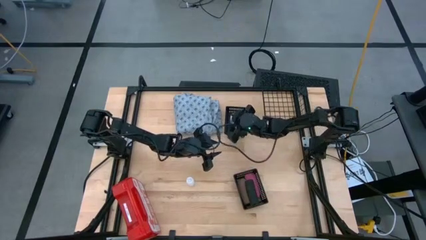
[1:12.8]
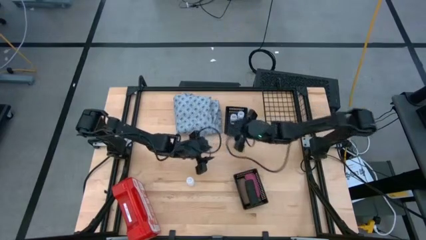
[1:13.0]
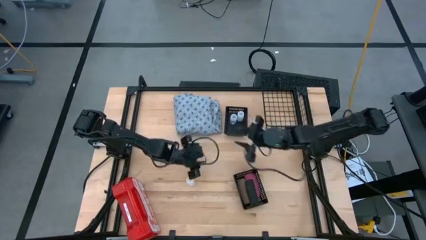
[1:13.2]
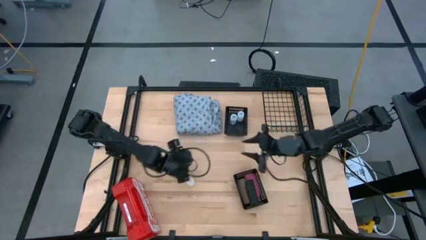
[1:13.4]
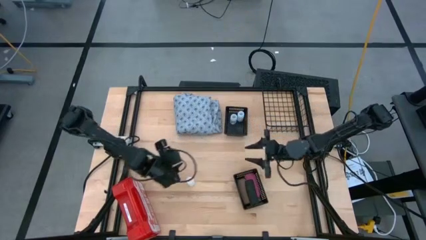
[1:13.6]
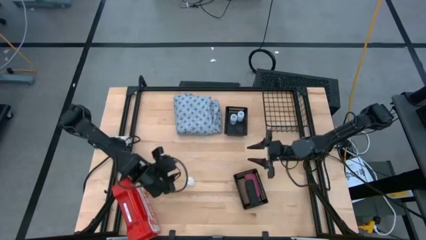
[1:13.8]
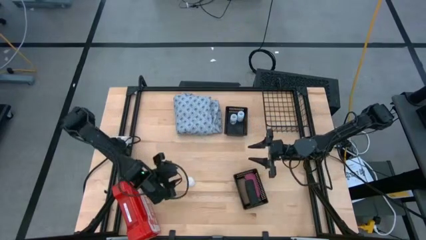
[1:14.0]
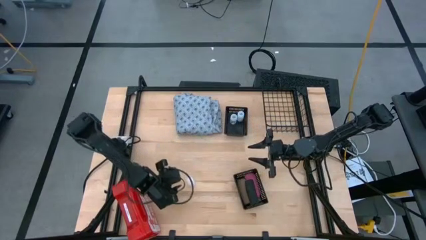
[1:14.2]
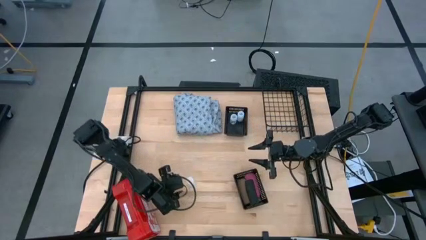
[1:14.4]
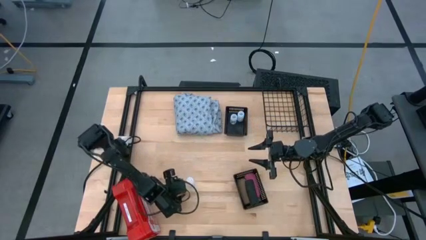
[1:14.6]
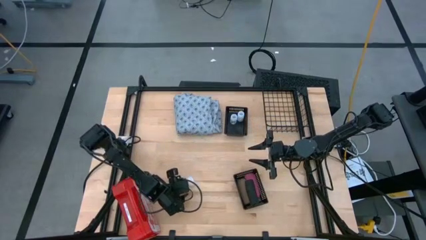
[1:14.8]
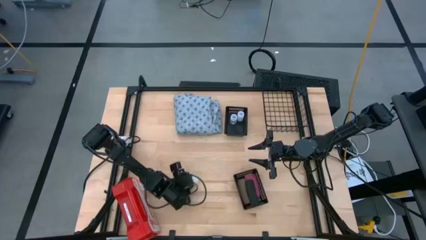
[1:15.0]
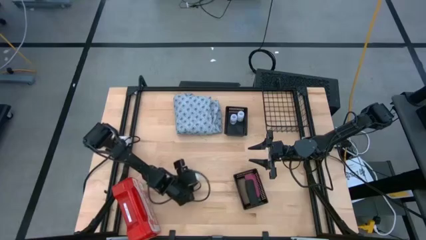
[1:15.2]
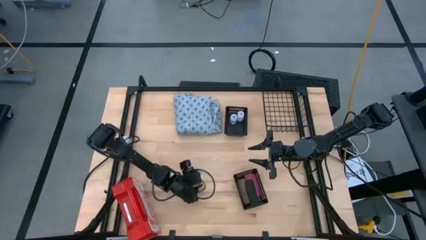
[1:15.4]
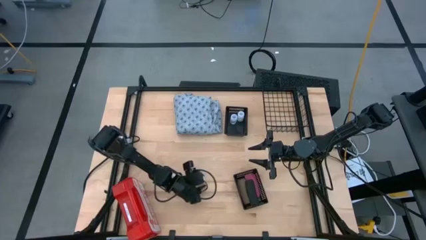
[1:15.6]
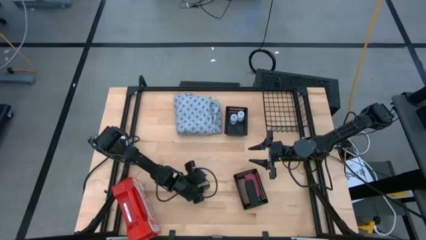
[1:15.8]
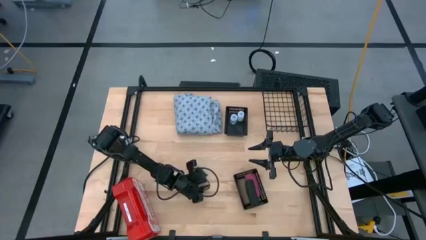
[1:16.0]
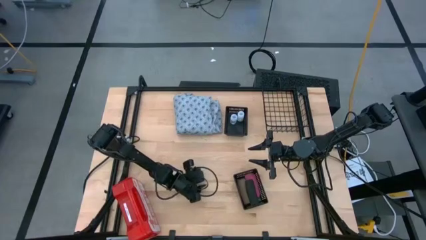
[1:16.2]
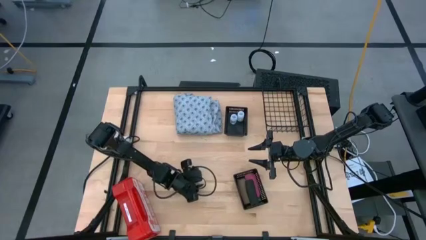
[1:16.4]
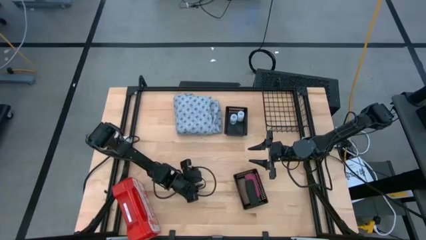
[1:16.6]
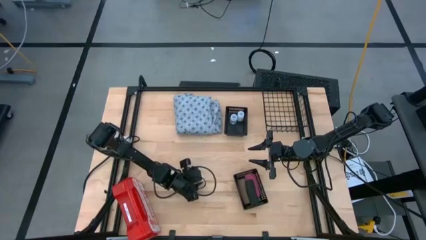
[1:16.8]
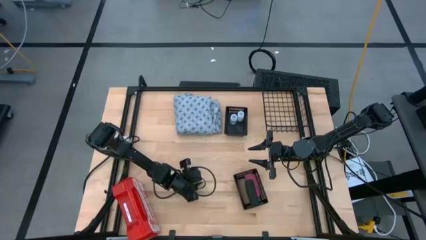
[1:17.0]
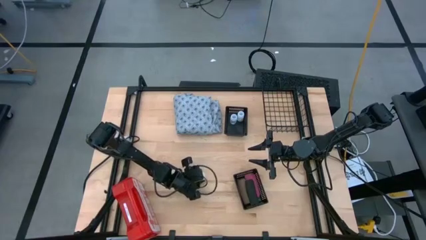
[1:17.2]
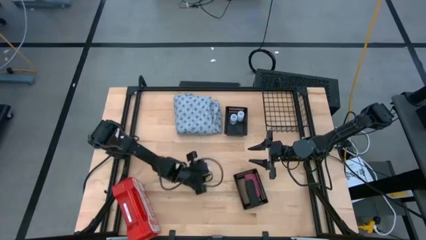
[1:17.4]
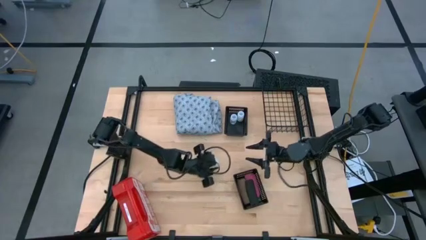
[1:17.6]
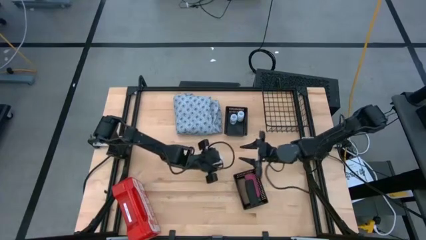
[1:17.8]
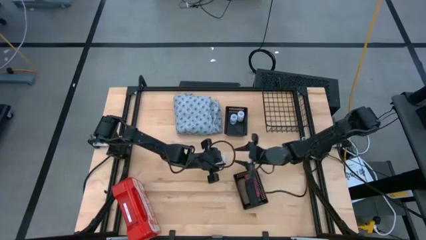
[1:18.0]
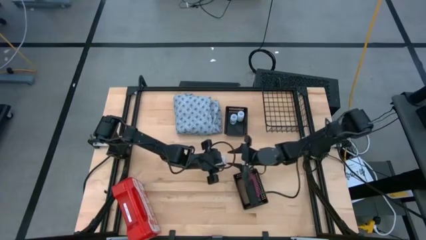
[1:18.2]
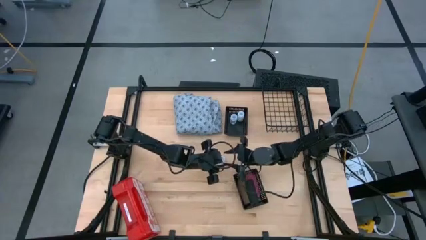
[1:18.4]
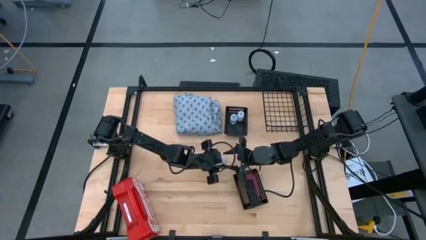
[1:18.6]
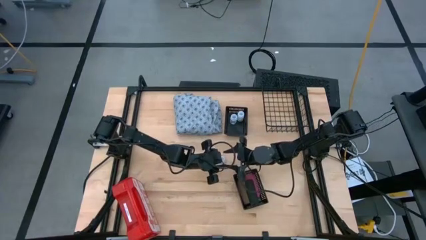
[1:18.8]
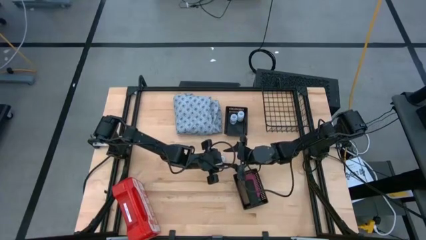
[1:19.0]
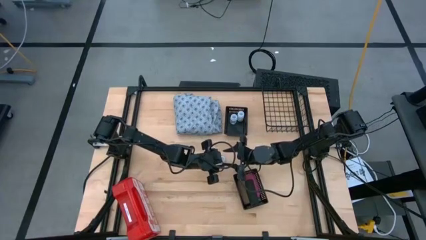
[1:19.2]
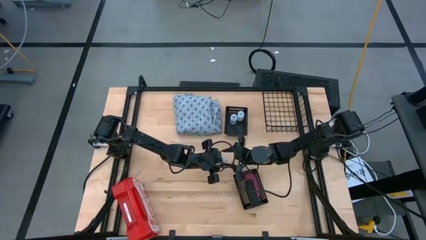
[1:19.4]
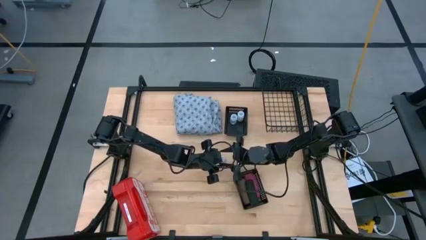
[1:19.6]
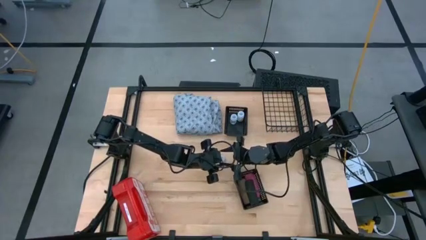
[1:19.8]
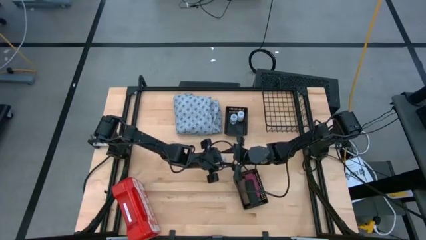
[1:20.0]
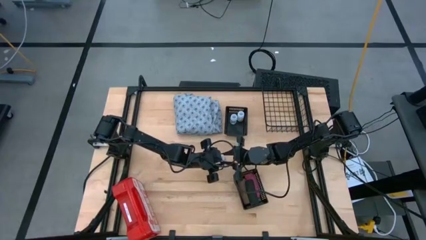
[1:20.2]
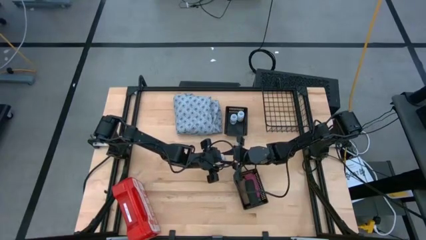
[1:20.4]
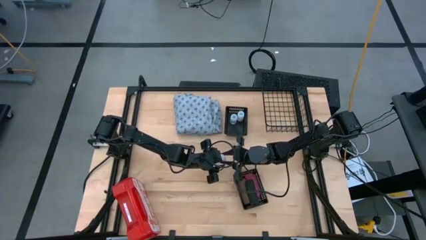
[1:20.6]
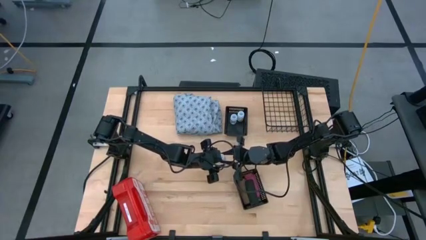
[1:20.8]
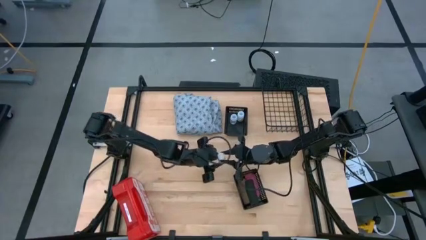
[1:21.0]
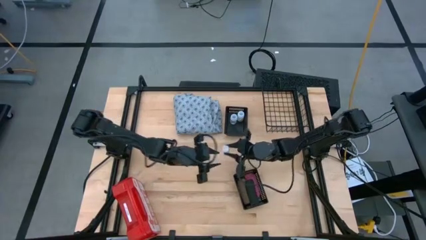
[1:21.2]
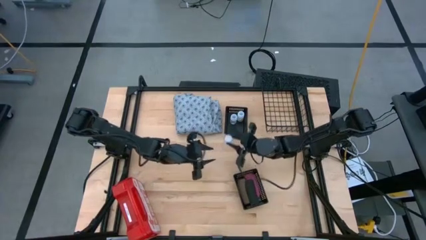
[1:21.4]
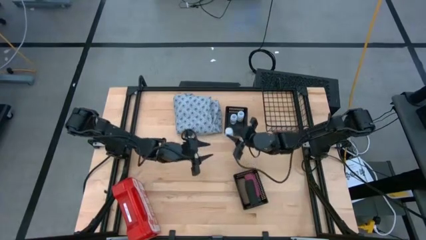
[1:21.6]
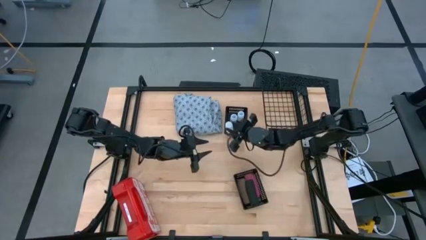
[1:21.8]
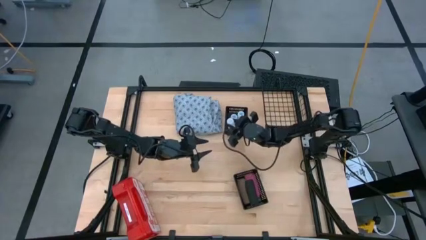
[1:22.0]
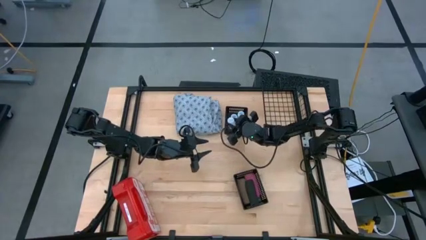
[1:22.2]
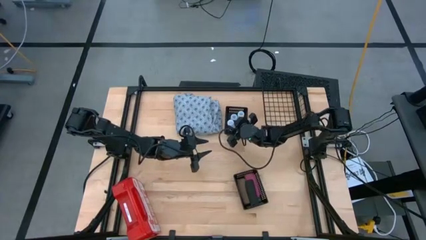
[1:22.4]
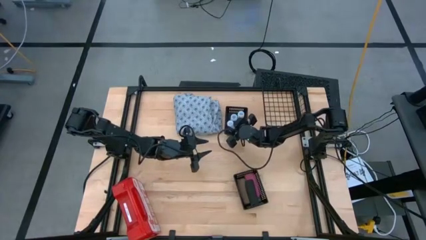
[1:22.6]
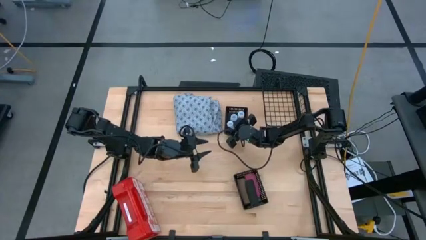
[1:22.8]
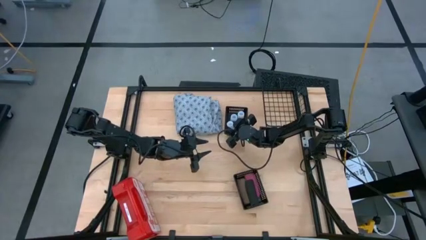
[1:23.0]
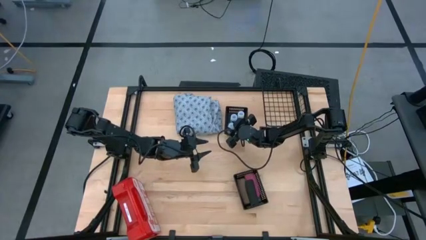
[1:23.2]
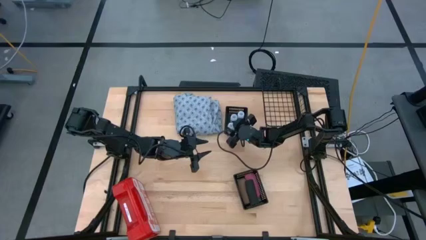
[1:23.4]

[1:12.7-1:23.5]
Task: Pick & Place Medicine items
Put the transparent pill bottle into the top black basket
